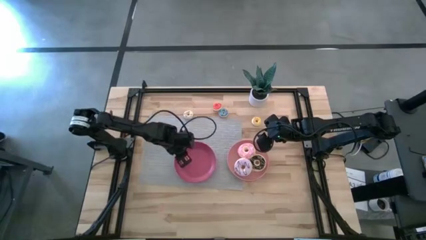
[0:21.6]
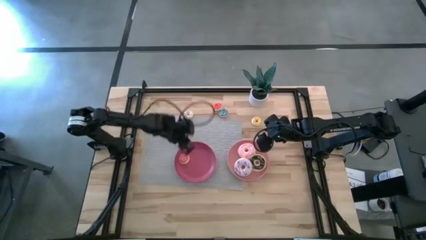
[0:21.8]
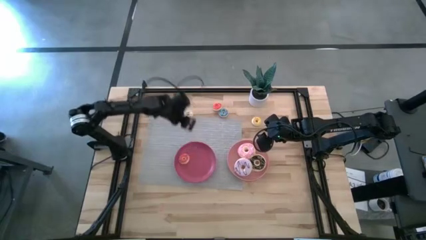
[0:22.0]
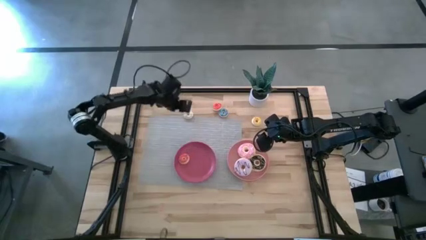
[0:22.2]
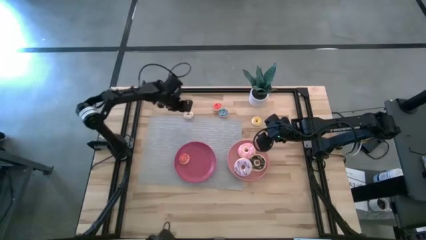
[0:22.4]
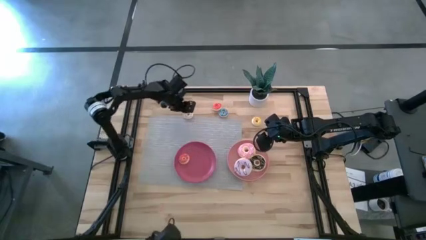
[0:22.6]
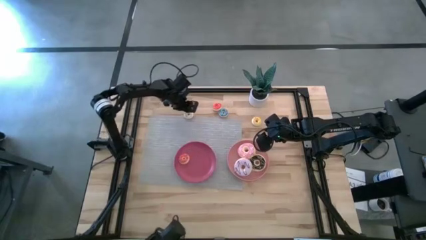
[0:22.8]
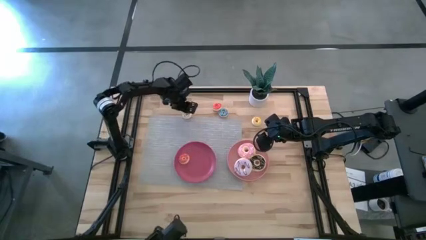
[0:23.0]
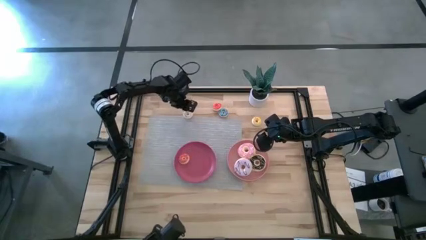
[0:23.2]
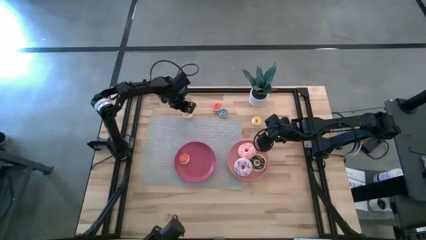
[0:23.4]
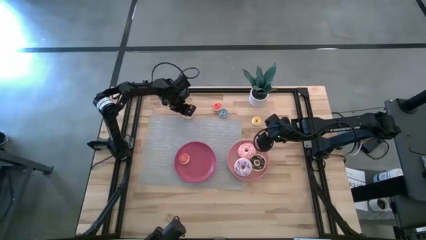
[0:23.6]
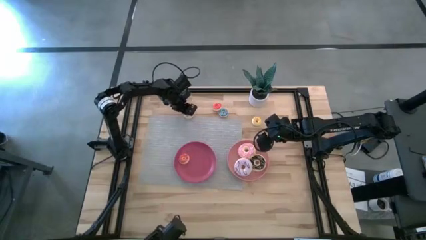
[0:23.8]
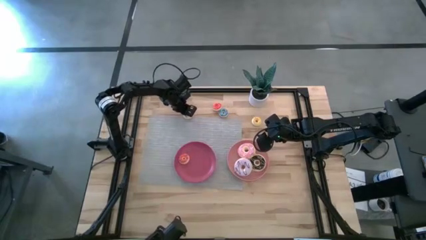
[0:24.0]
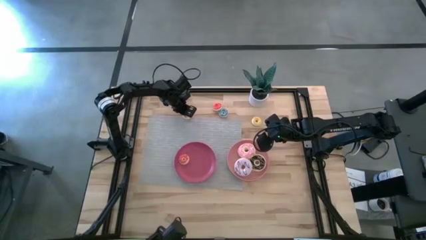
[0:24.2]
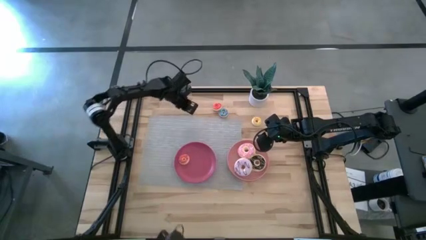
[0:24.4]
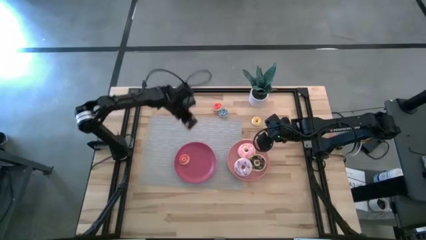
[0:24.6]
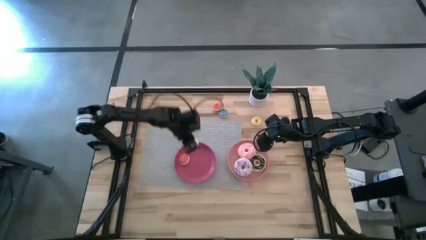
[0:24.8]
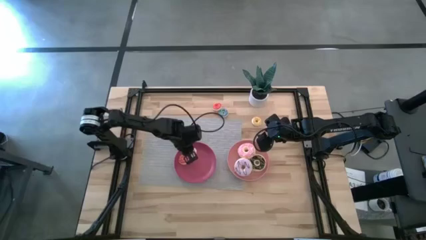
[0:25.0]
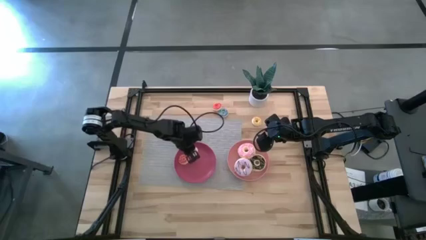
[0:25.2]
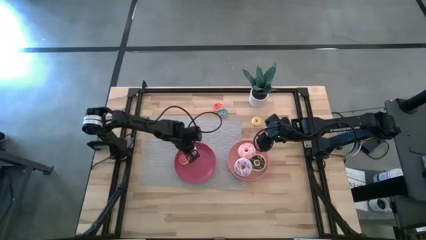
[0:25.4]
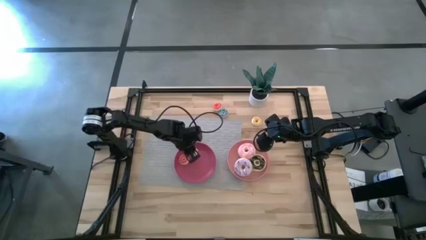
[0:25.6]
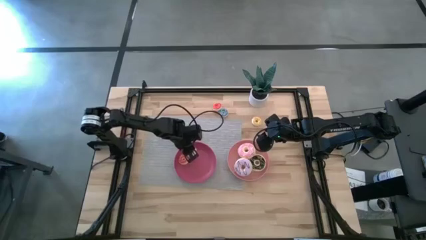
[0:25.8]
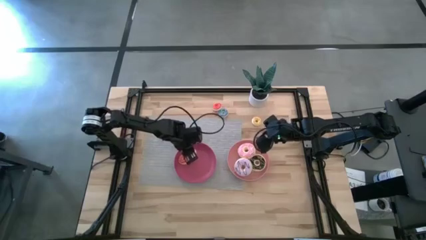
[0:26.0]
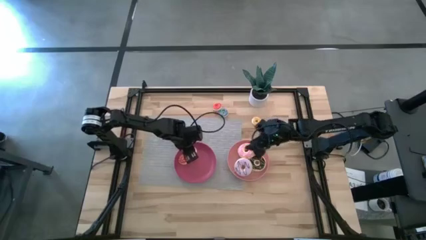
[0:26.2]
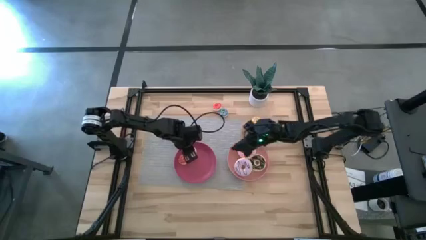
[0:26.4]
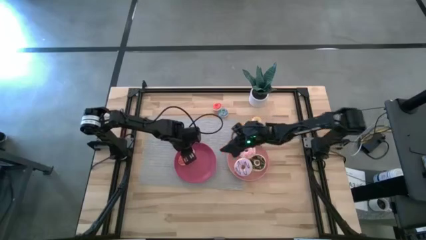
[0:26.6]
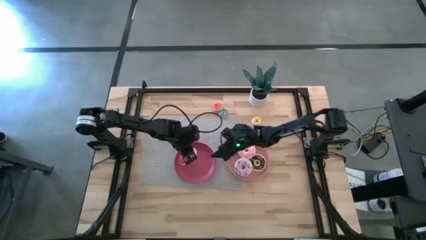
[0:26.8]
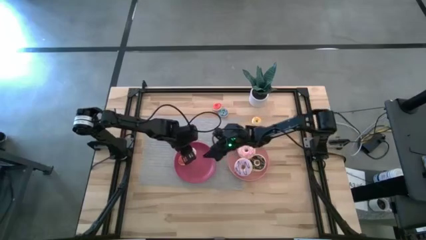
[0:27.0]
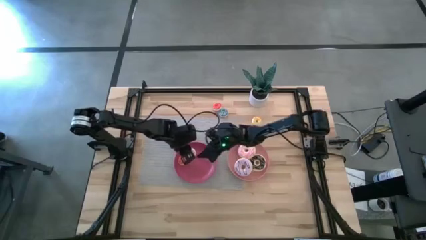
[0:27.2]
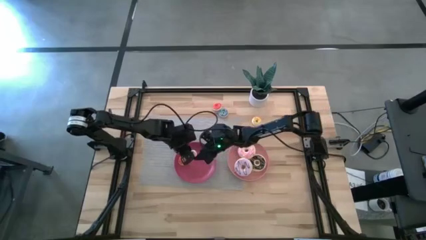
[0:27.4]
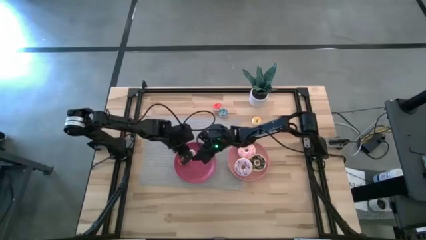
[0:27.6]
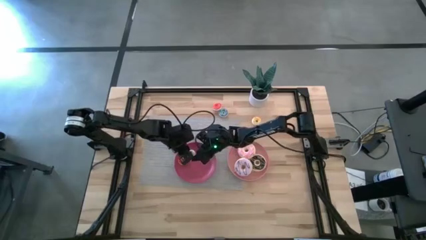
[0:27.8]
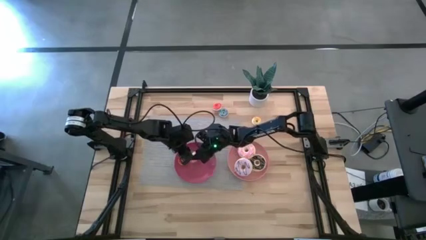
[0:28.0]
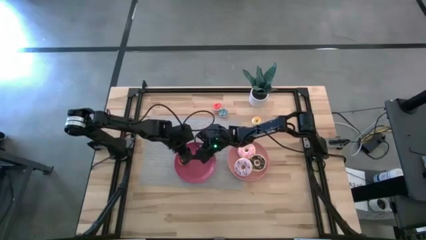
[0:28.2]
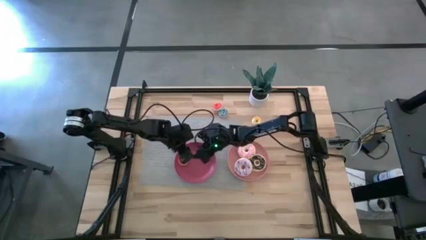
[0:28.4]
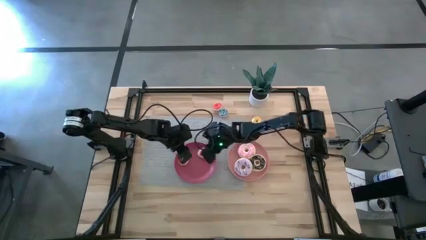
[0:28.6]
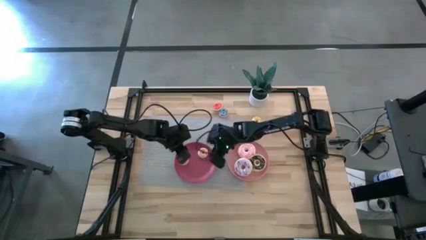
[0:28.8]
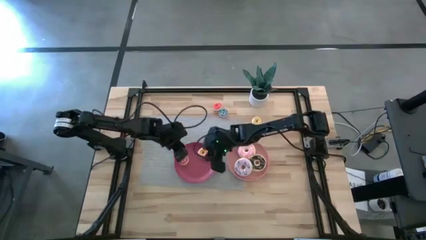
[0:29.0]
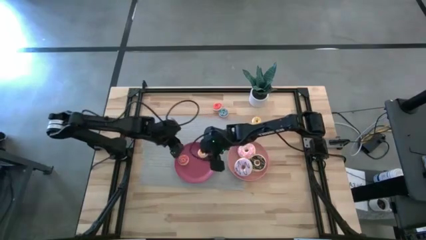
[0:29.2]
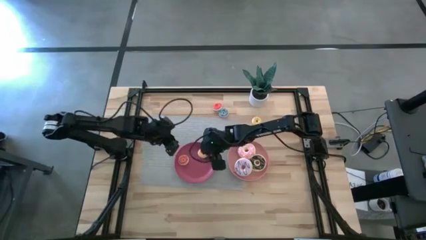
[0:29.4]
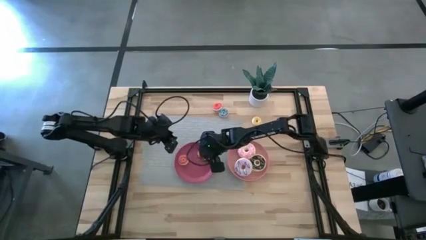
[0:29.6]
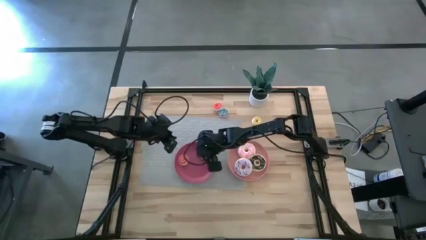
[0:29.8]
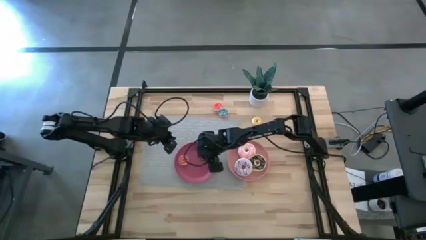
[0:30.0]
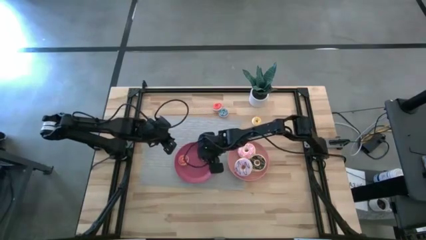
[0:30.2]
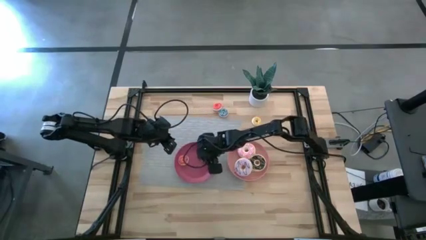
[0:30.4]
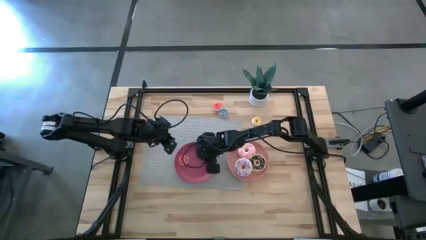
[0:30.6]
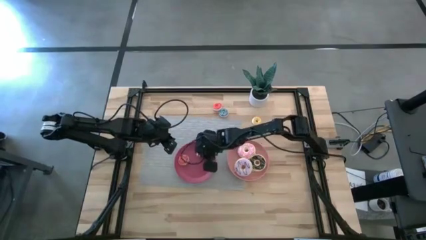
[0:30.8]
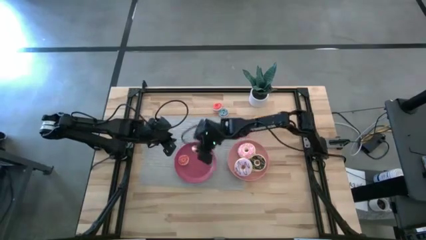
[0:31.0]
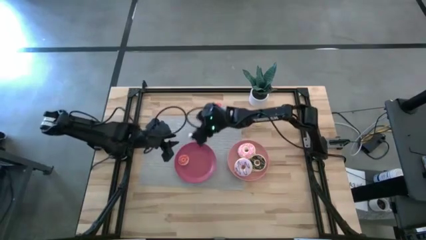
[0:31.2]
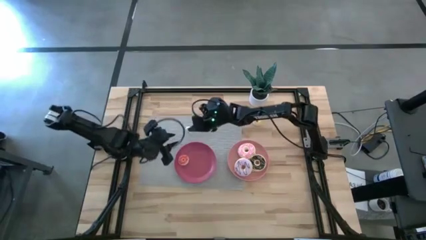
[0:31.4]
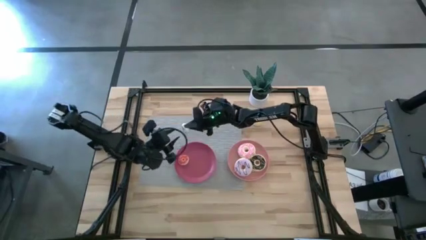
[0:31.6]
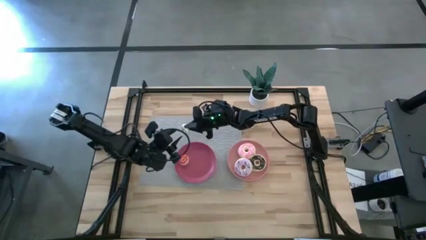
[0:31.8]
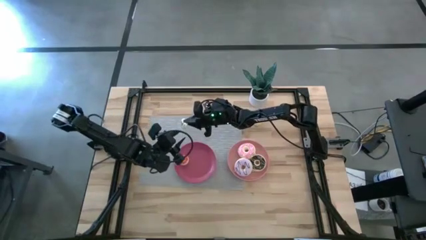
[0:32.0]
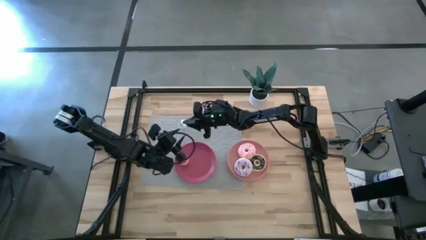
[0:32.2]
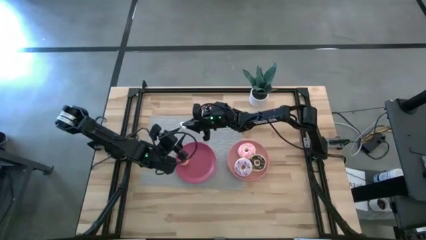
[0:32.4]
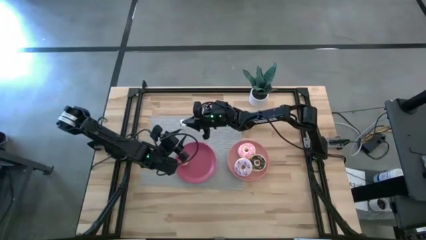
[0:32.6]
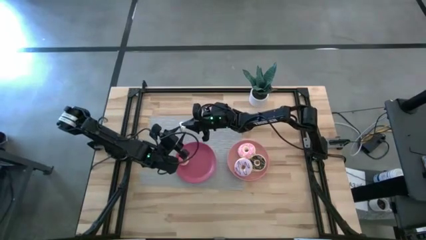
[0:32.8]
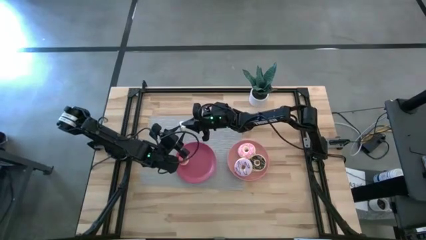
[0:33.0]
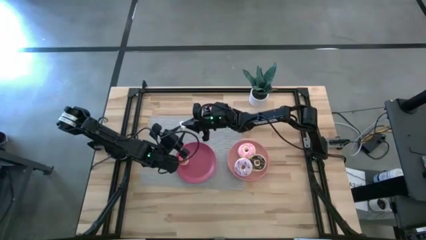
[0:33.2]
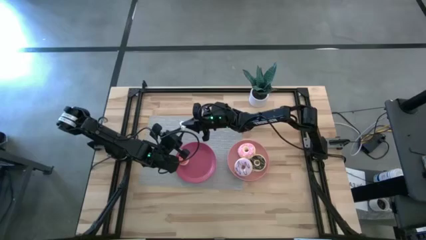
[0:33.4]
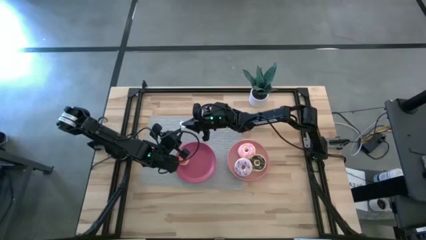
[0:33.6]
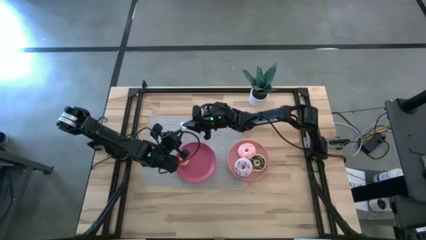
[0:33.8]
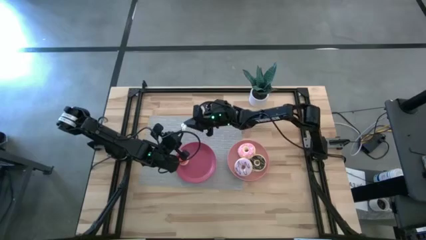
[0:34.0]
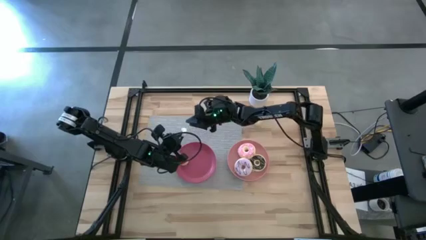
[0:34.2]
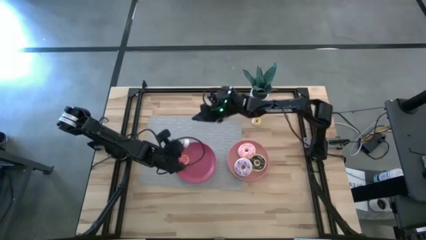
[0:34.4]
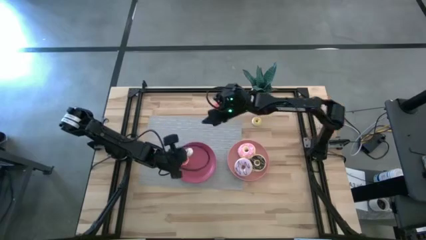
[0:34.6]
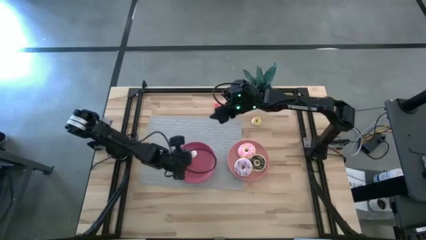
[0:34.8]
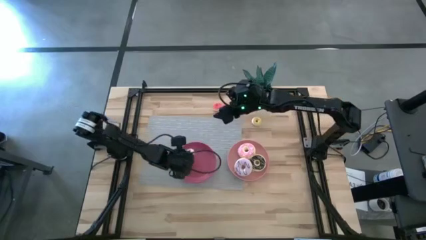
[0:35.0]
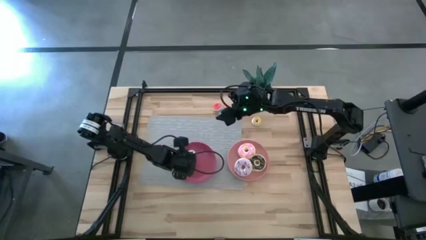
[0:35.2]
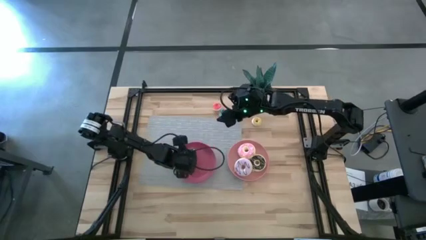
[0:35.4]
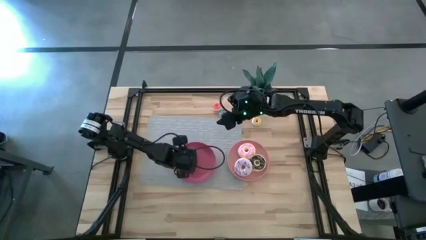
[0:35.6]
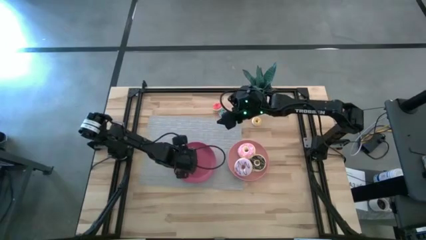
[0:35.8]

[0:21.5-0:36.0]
Task: Pick & Place donuts
Put the small white donut on the pink plate

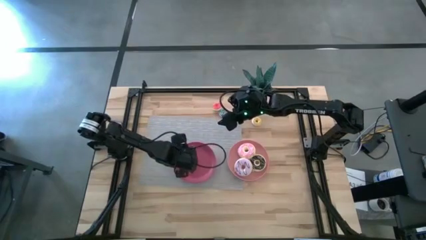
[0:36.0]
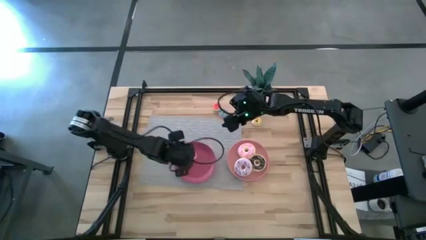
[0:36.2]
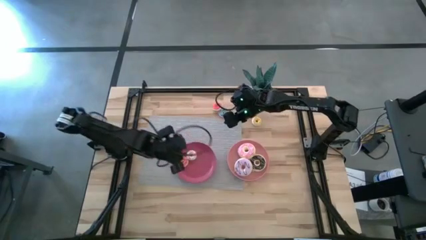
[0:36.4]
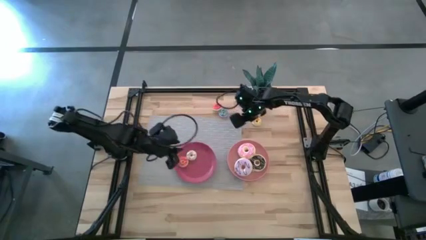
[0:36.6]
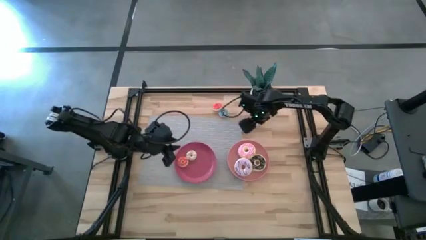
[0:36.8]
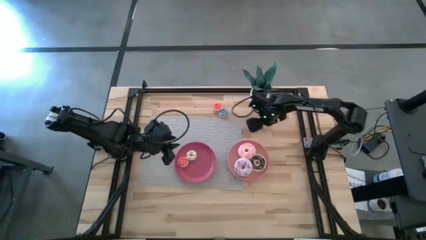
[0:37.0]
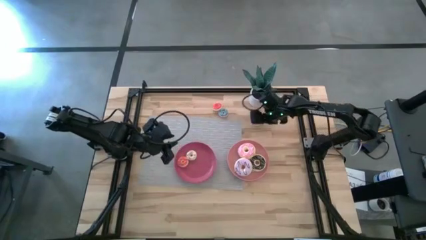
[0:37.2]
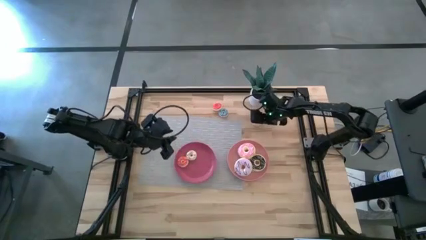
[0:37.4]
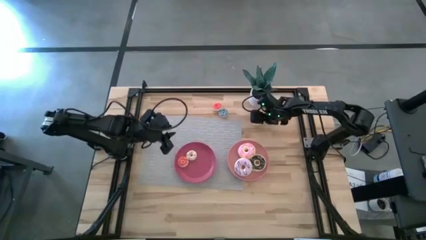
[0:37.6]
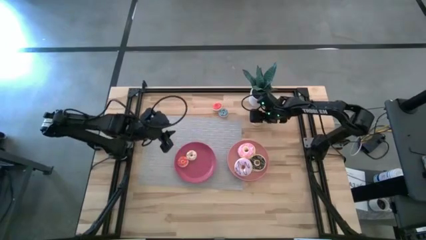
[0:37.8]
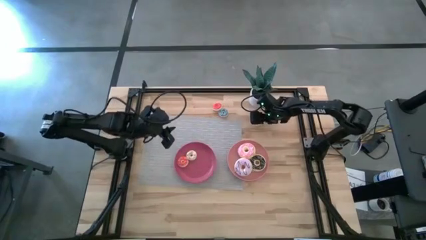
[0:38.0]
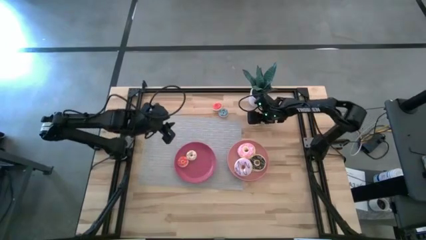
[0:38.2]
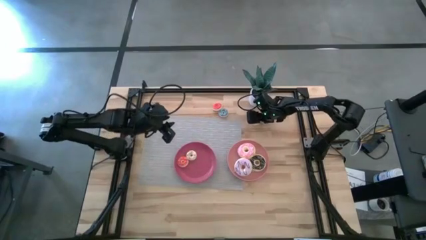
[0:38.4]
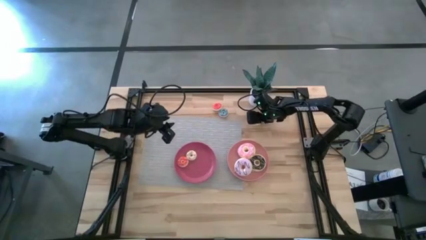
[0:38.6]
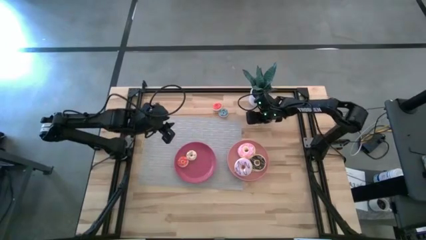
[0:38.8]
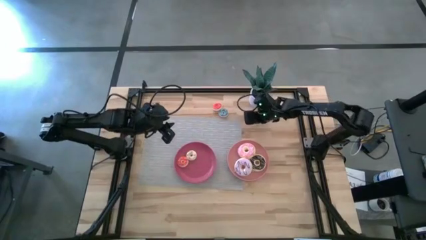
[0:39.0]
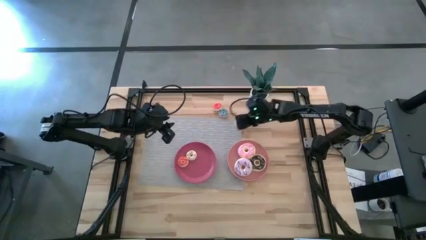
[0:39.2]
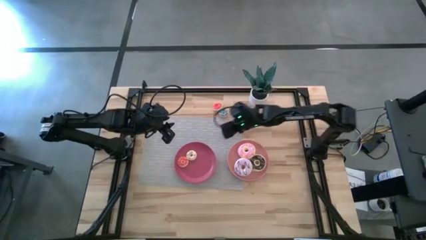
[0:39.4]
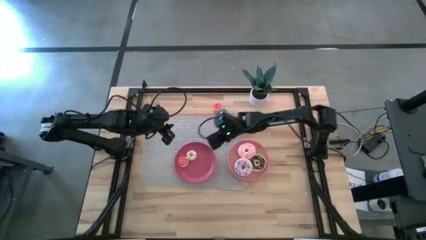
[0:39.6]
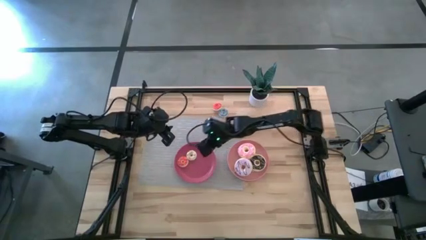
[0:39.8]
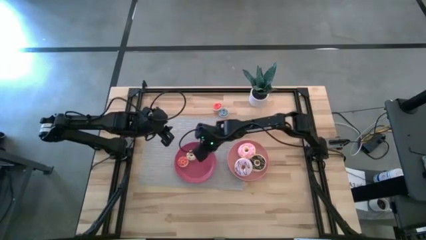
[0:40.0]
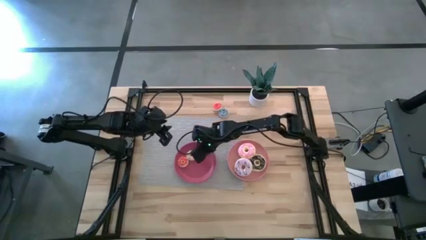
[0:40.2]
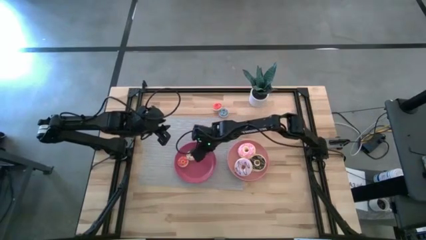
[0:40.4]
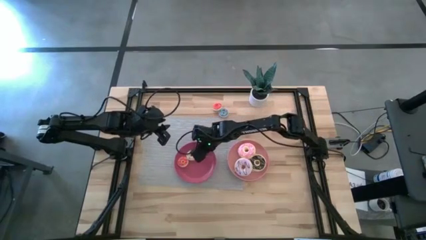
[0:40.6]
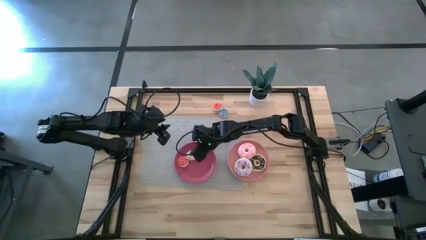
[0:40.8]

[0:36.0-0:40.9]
Put the small yellow donut on the pink plate
